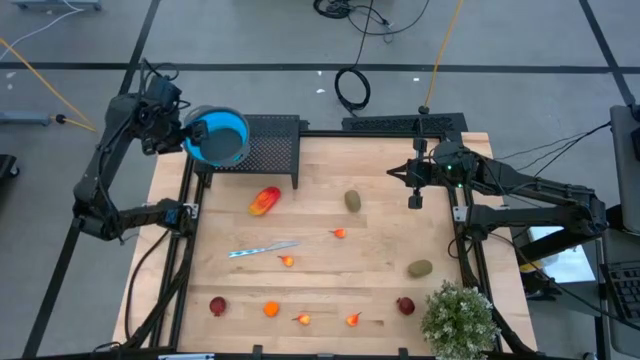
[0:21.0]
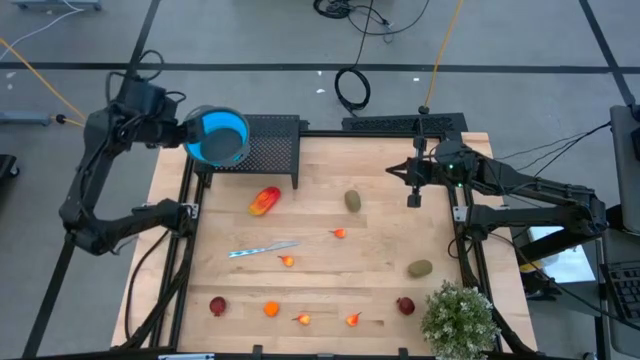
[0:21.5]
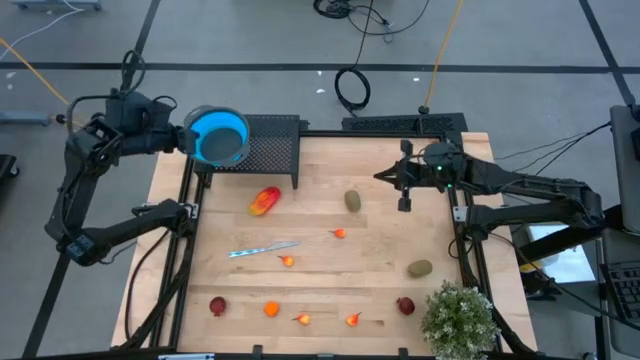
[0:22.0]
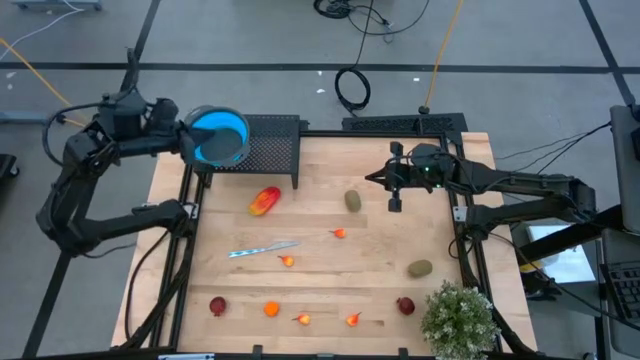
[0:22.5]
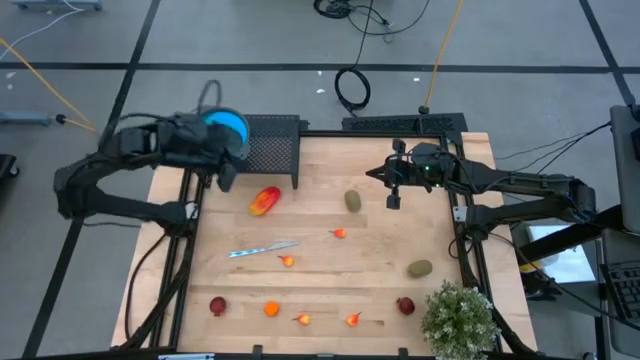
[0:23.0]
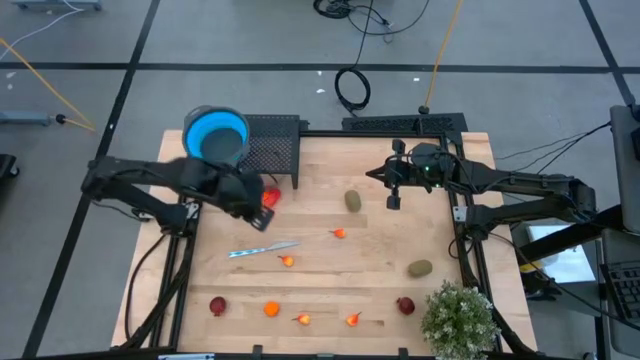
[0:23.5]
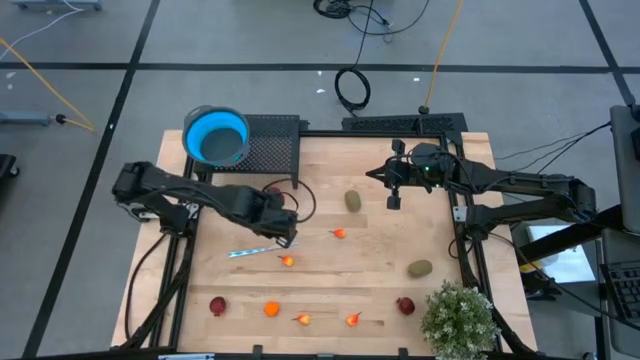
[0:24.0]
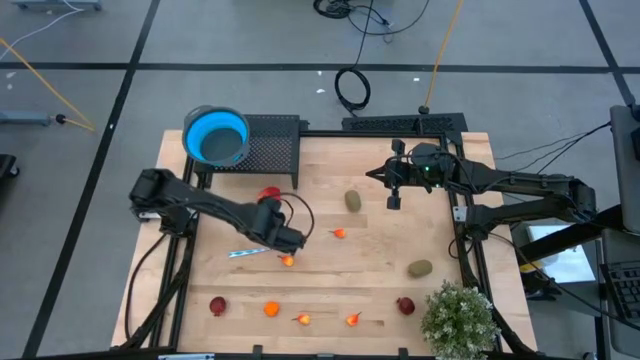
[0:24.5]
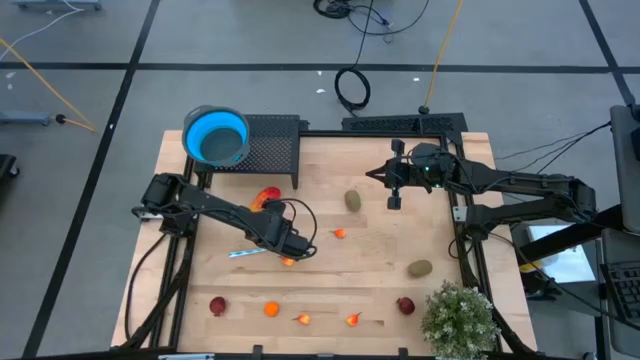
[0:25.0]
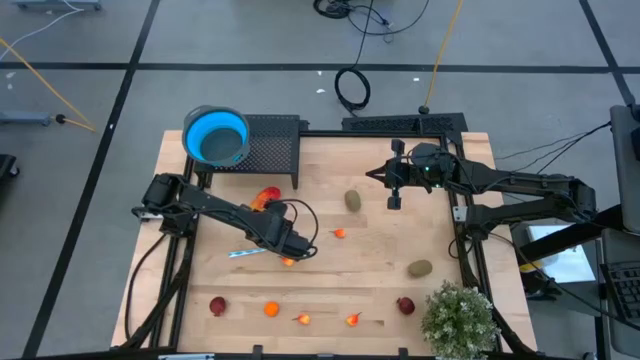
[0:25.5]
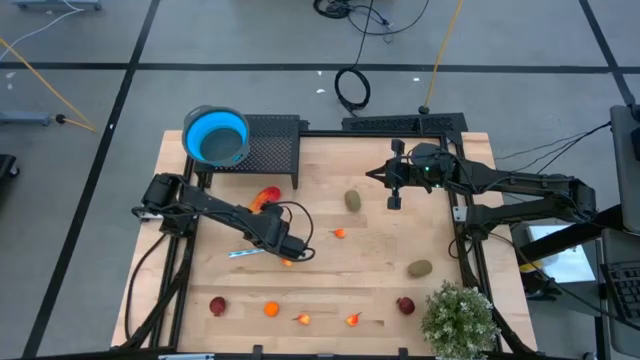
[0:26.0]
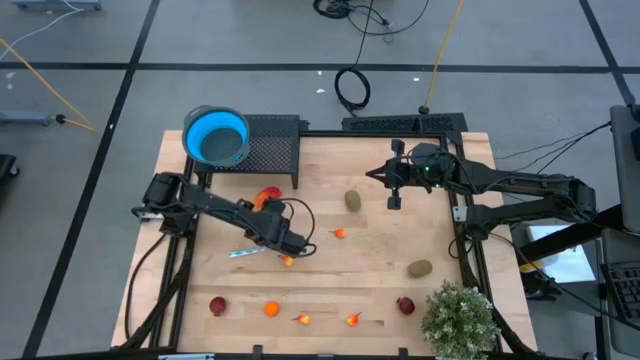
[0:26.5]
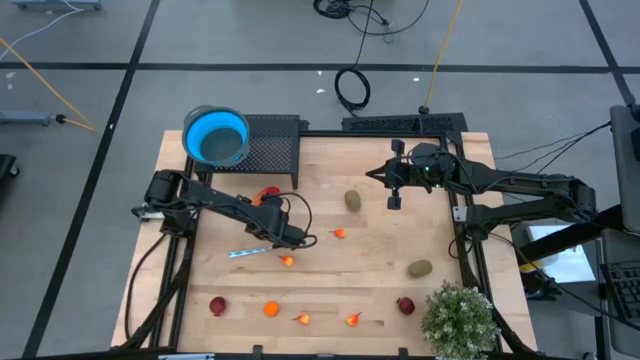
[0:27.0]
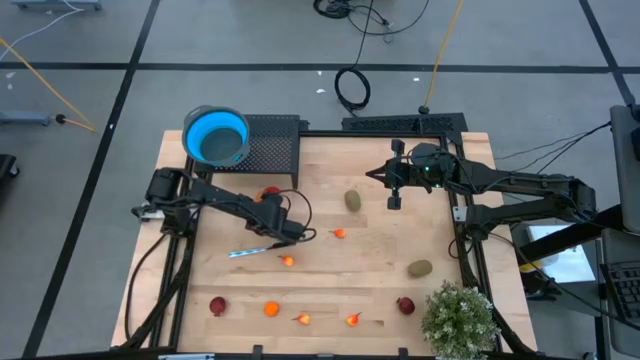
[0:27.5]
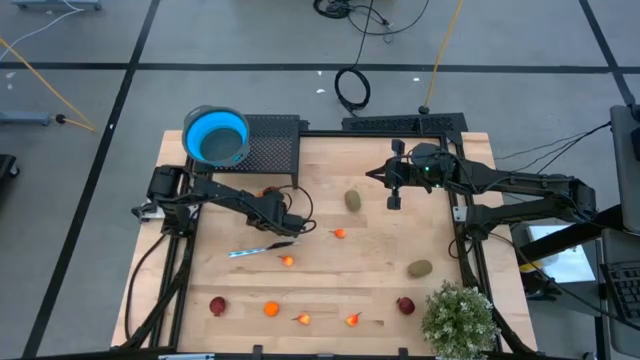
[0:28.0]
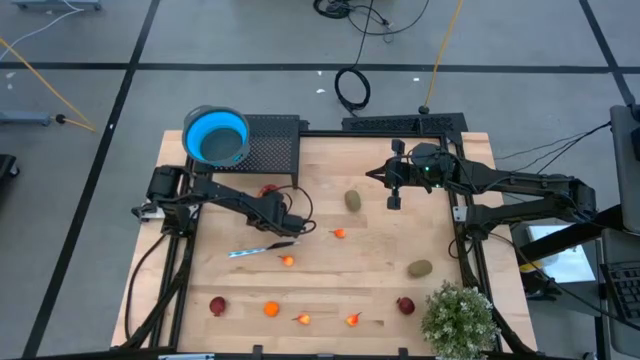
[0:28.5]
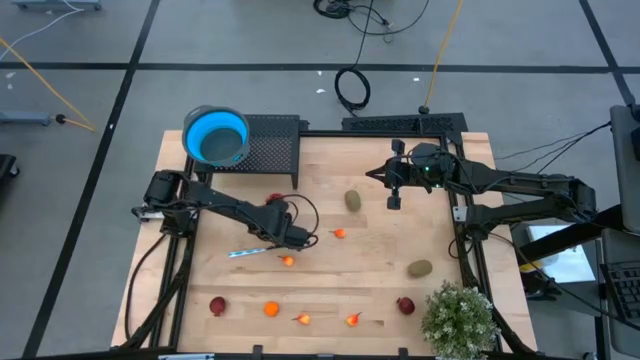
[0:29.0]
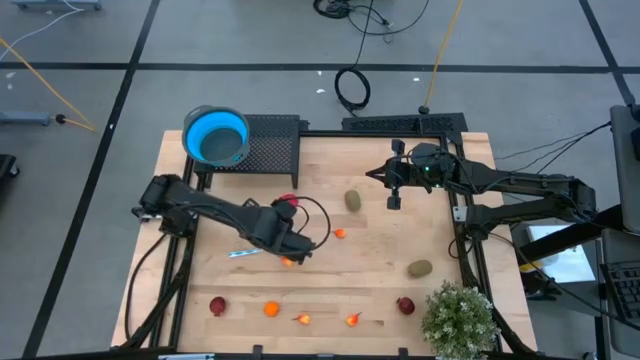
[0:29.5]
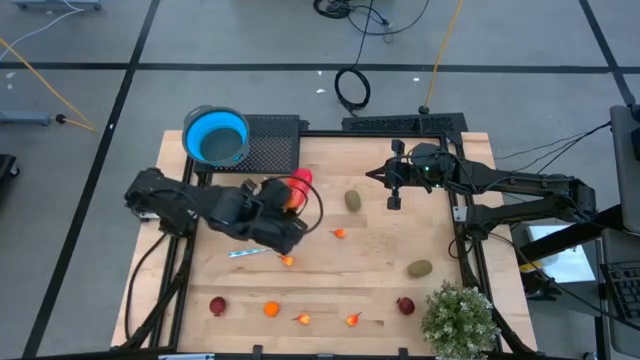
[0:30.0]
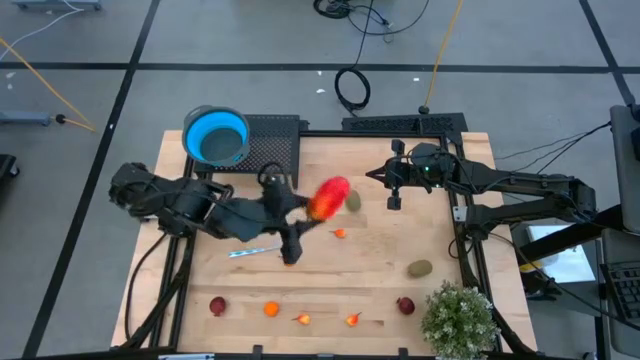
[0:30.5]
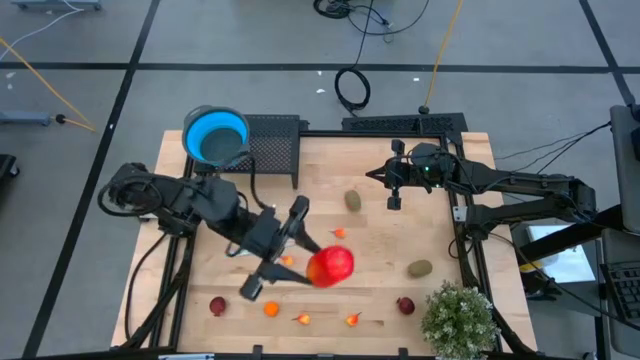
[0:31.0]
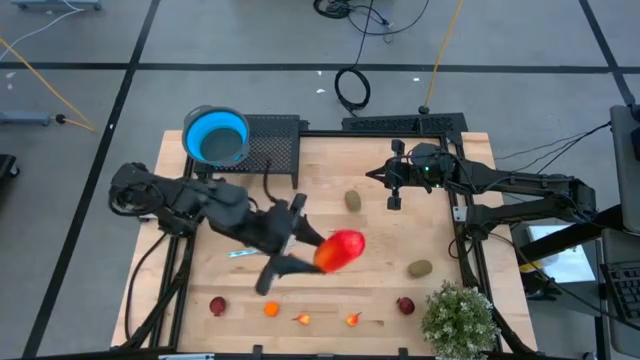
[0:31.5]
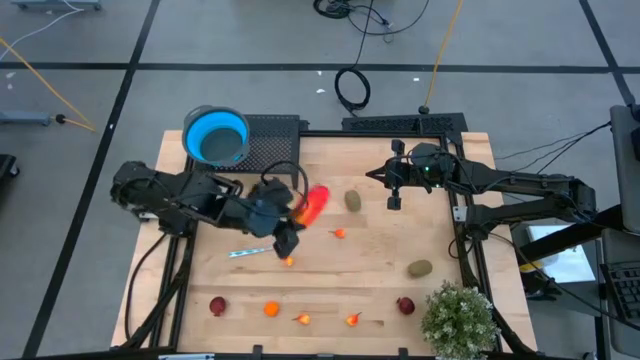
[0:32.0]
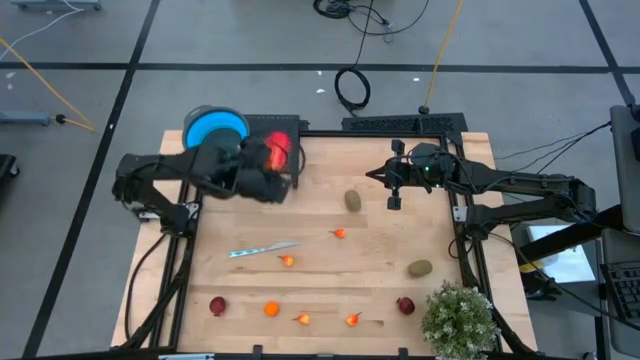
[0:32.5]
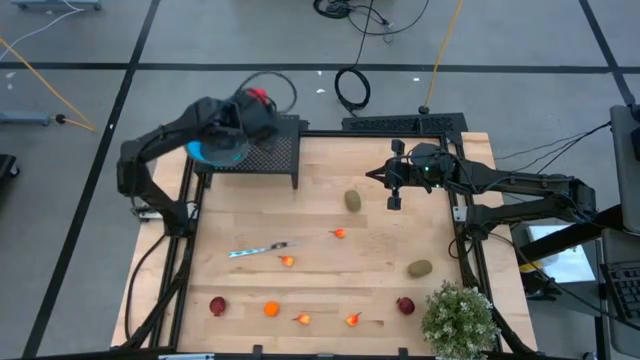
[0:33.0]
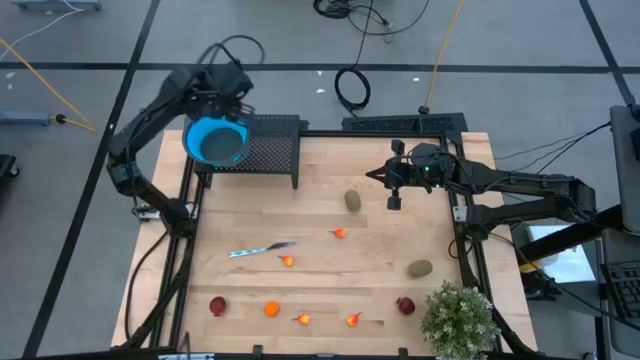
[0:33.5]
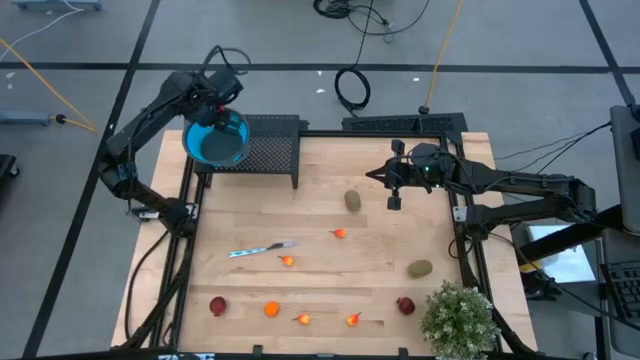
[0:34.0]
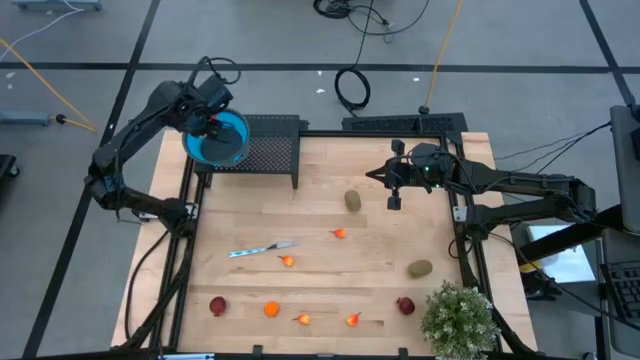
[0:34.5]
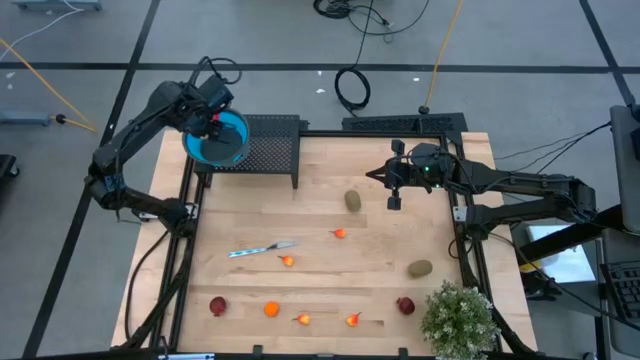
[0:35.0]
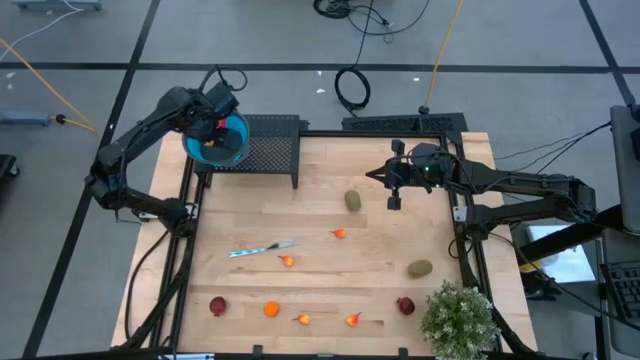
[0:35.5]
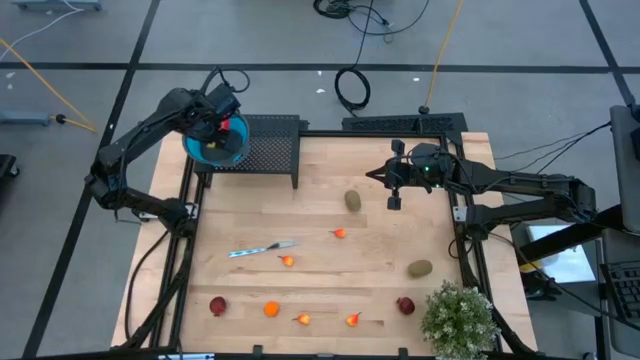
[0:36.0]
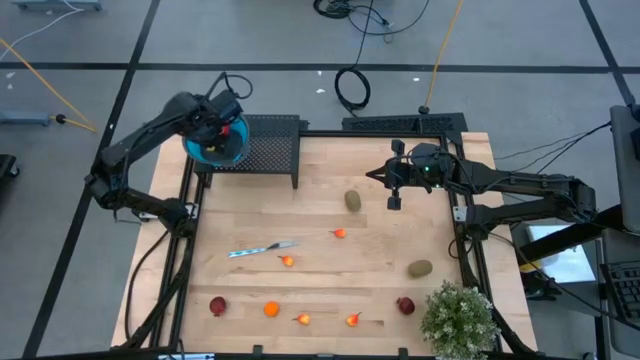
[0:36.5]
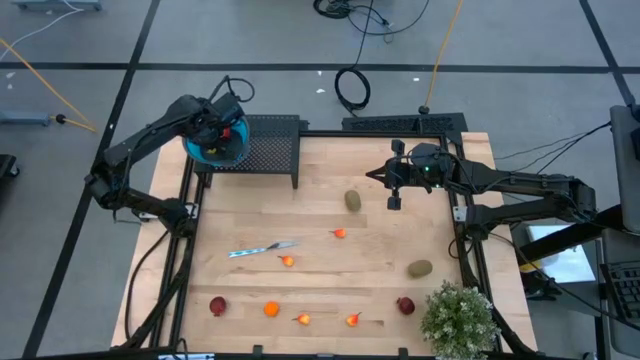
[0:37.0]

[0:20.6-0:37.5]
Task: Pick & Place Fruit
Put the mango into the blue strainer bowl on the shelf
